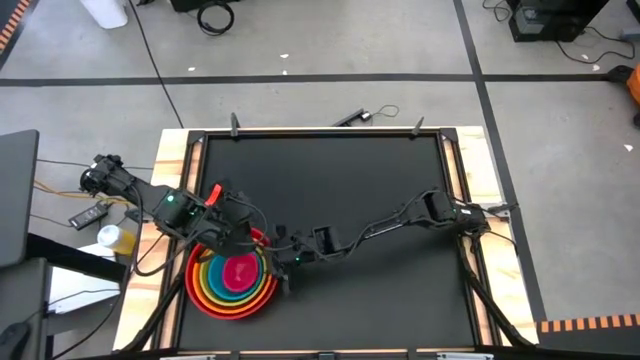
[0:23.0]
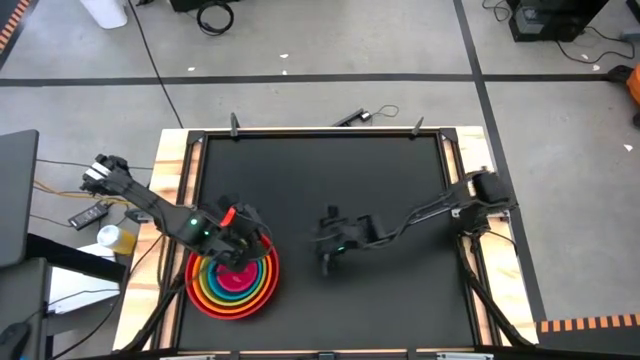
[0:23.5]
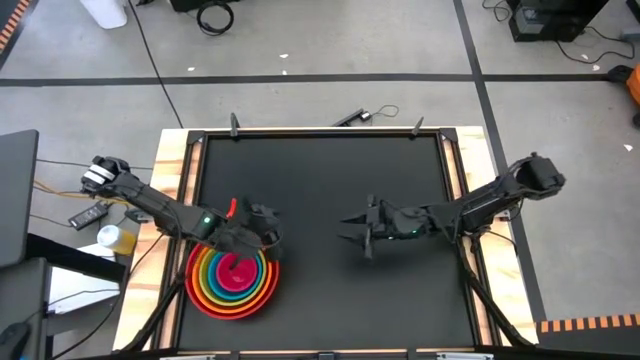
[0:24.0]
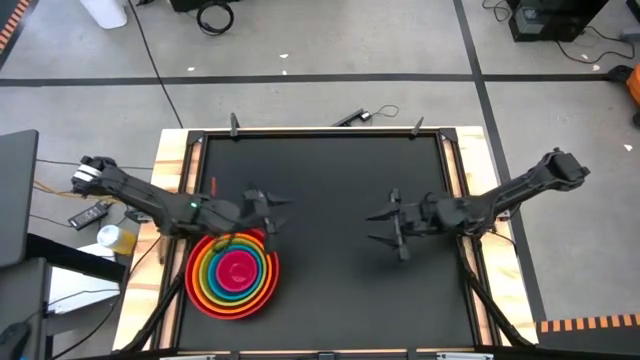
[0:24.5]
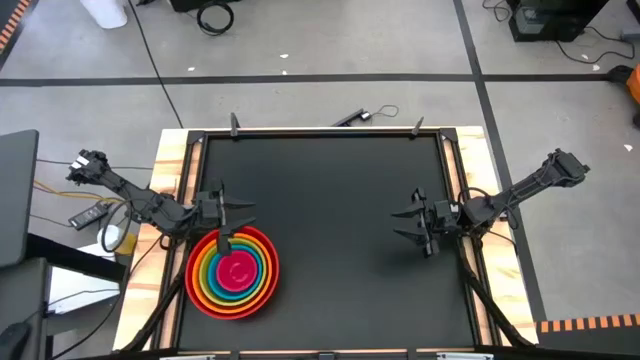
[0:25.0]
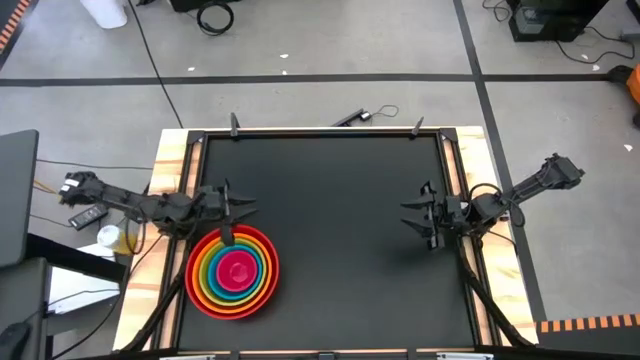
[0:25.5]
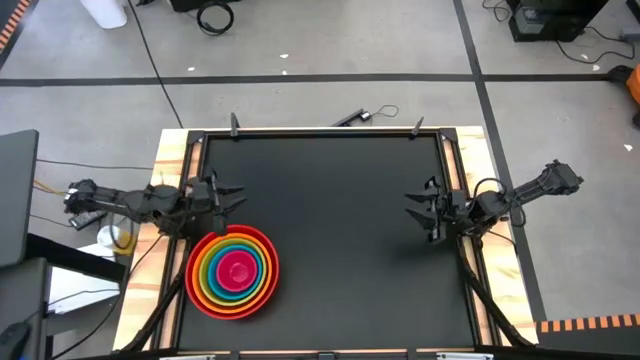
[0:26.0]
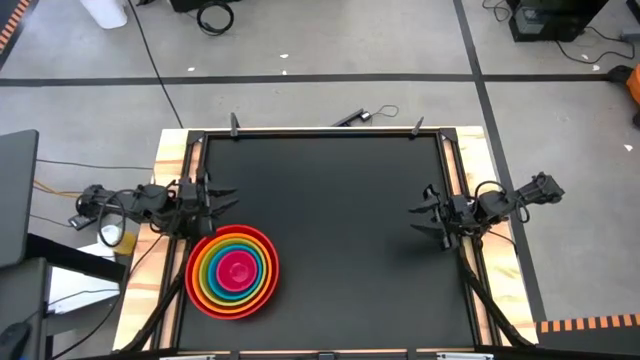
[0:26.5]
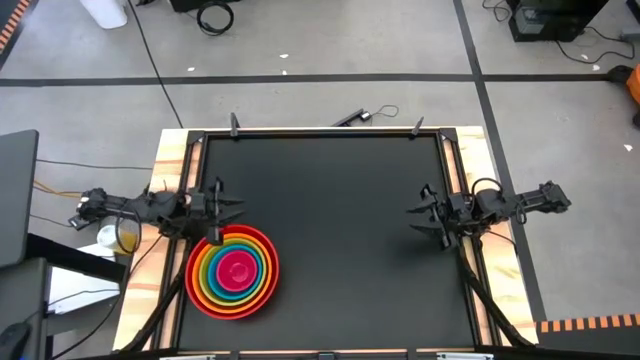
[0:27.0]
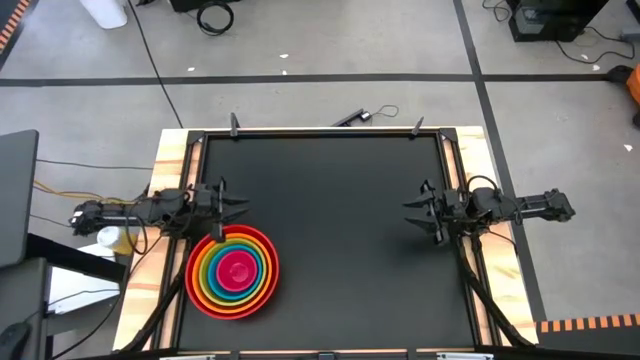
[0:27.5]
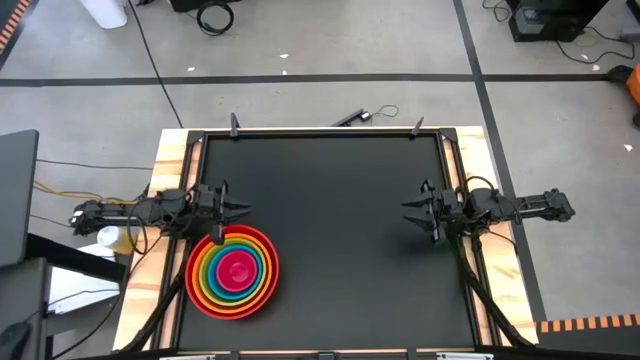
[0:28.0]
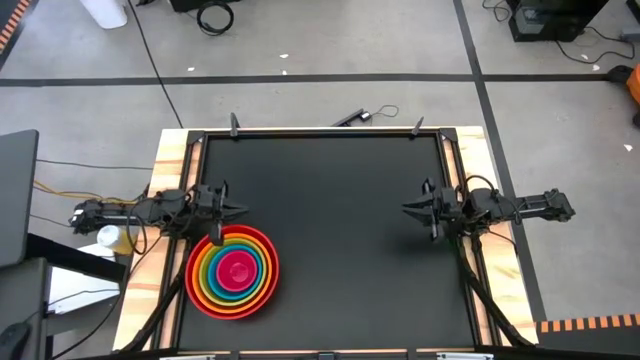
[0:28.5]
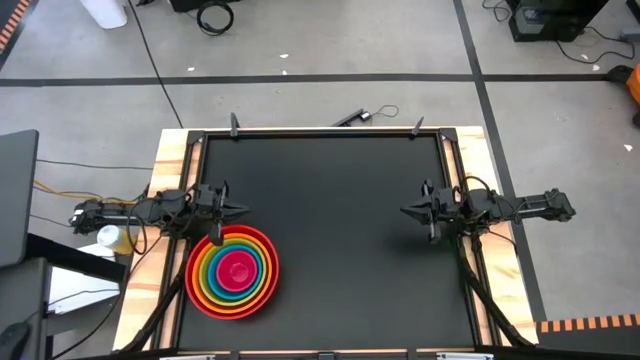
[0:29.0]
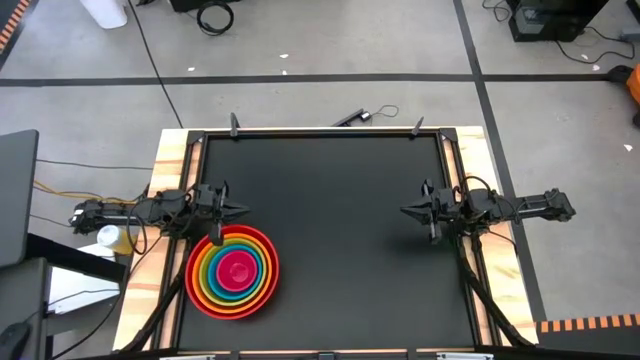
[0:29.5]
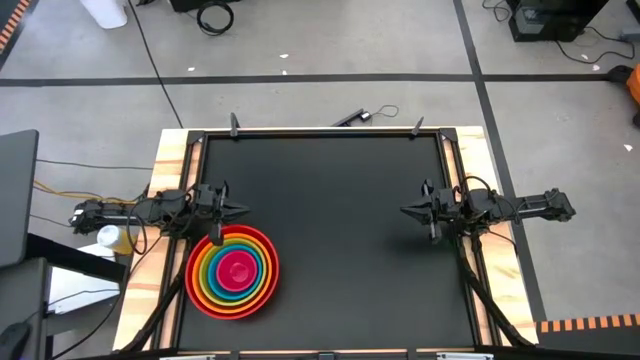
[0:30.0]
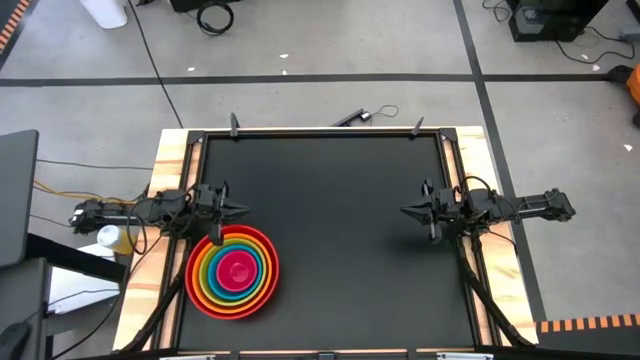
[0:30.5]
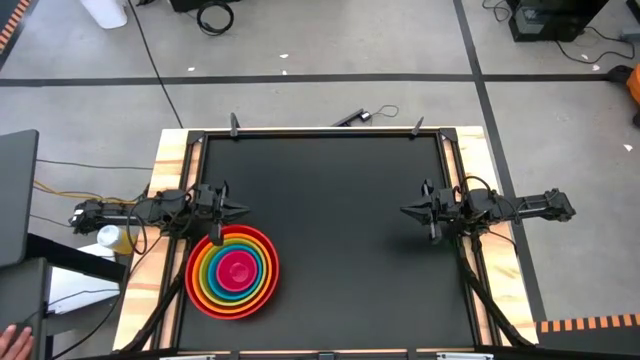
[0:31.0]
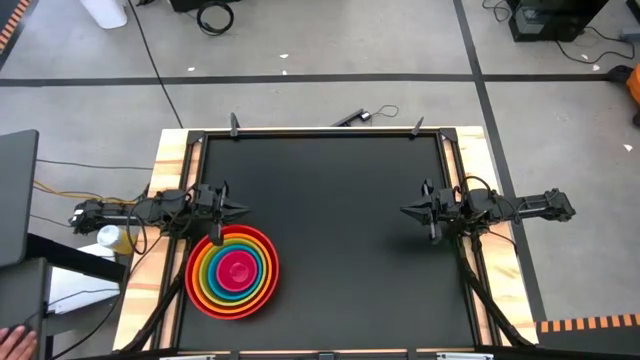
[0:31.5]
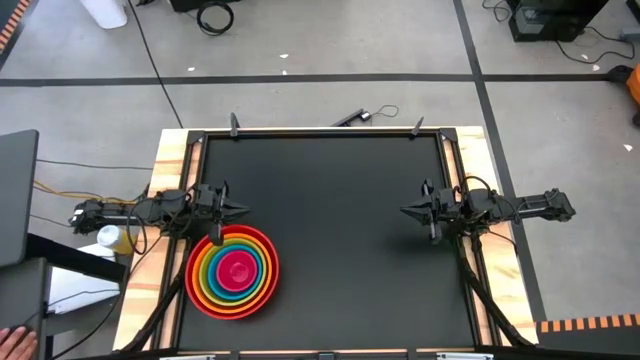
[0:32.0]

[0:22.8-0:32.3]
Return to Home Position

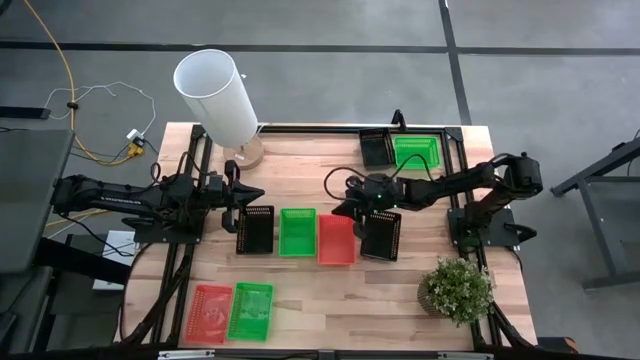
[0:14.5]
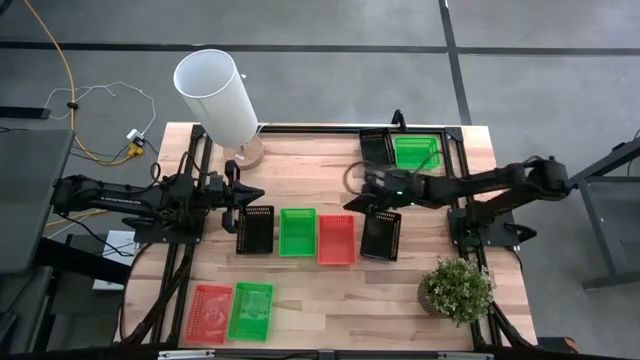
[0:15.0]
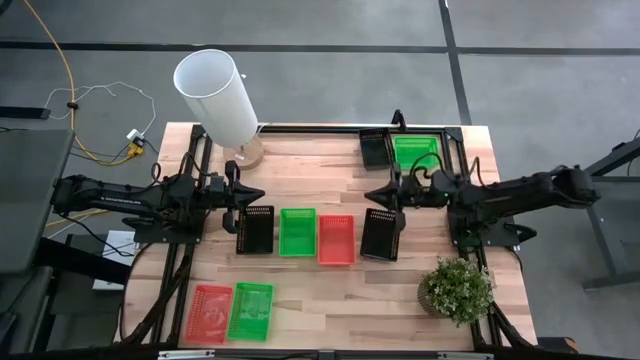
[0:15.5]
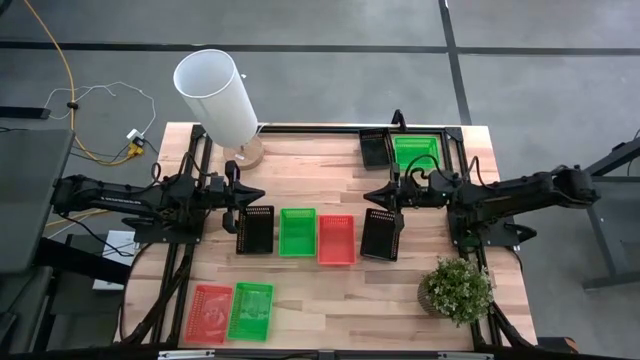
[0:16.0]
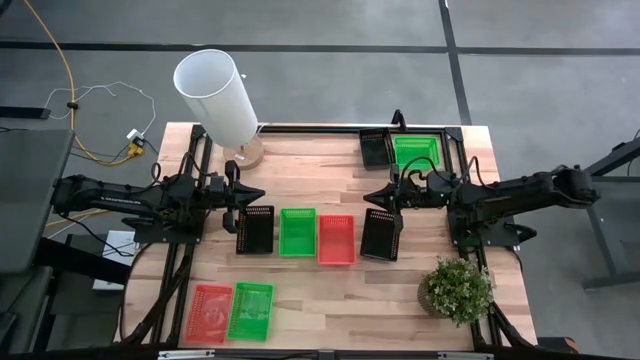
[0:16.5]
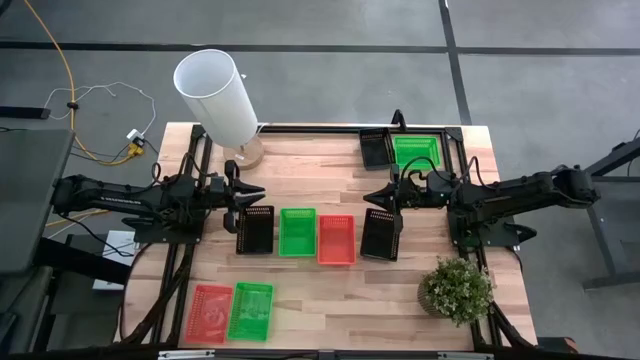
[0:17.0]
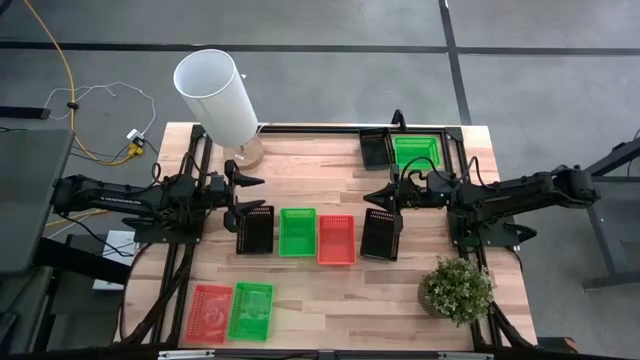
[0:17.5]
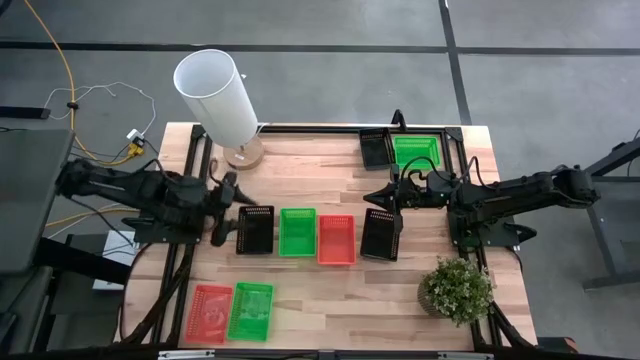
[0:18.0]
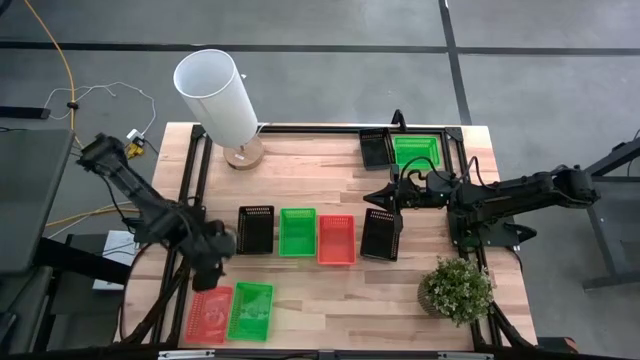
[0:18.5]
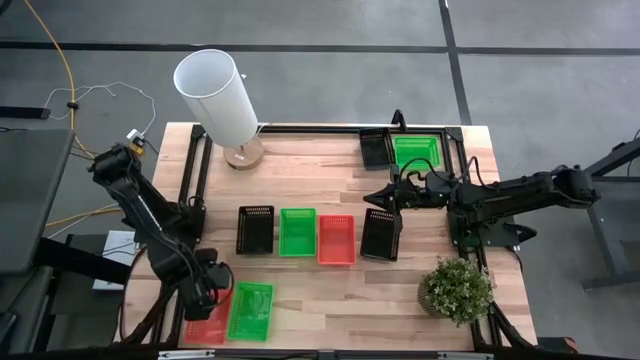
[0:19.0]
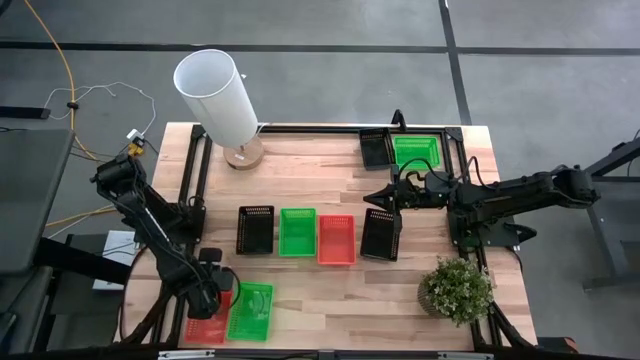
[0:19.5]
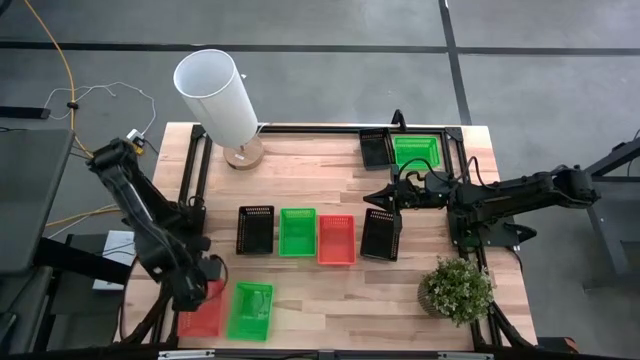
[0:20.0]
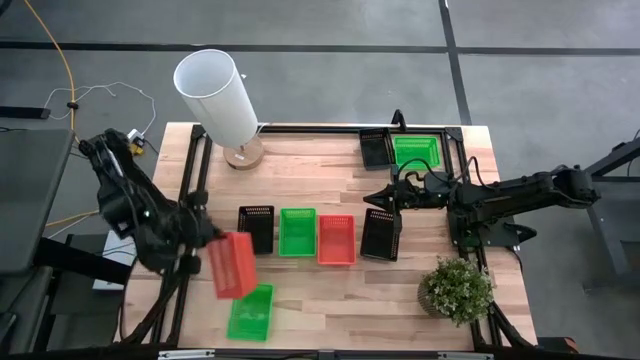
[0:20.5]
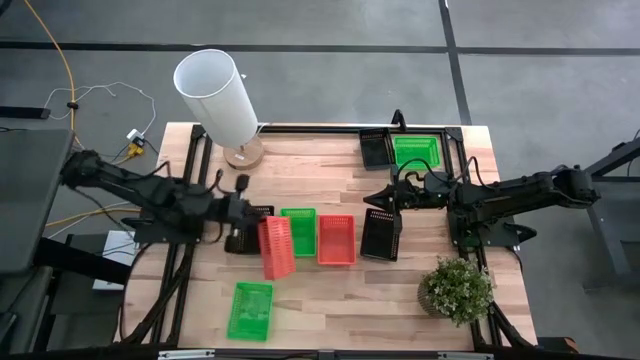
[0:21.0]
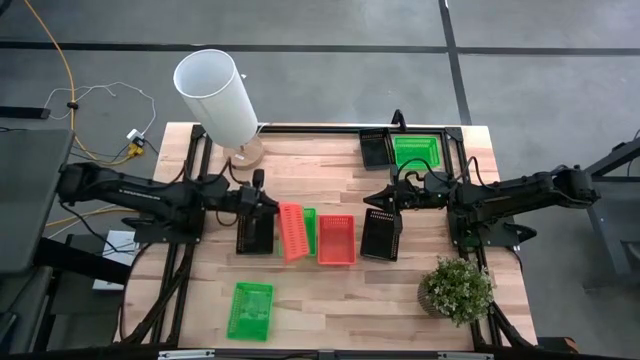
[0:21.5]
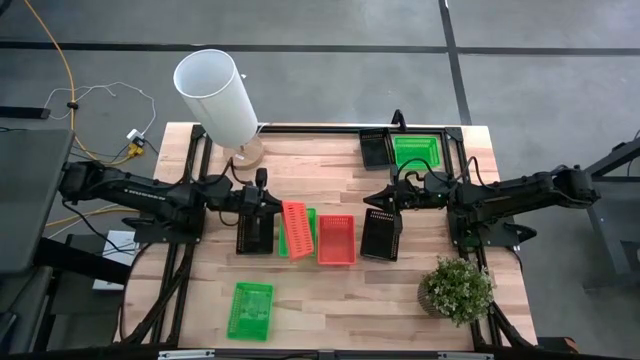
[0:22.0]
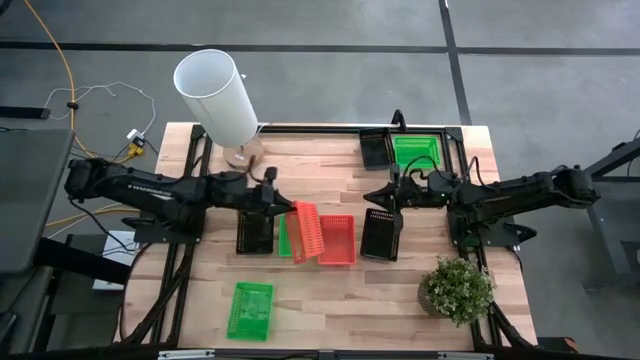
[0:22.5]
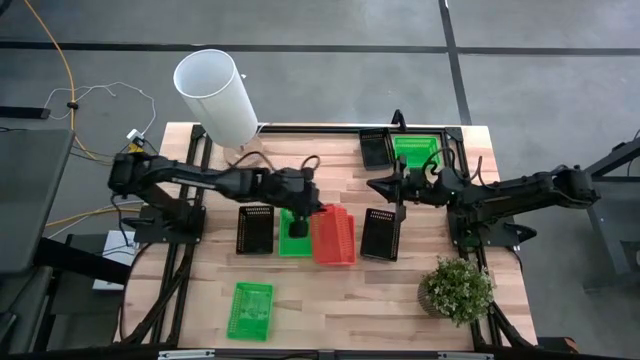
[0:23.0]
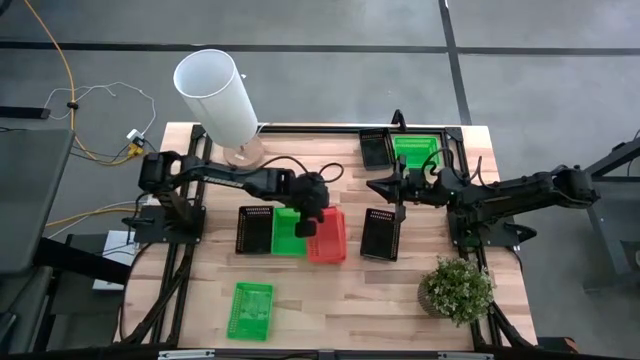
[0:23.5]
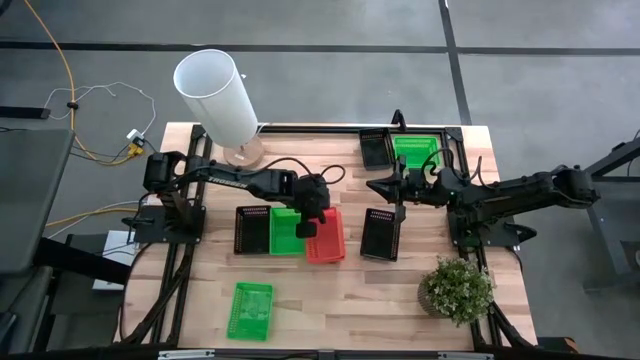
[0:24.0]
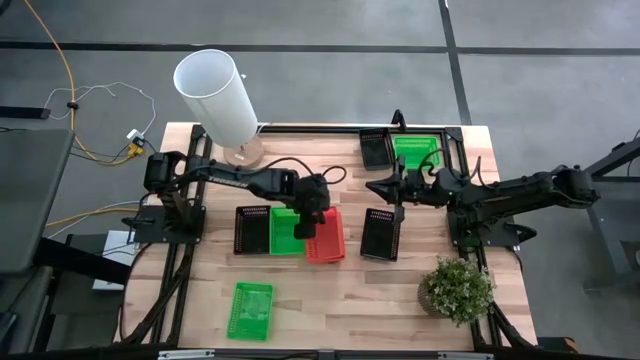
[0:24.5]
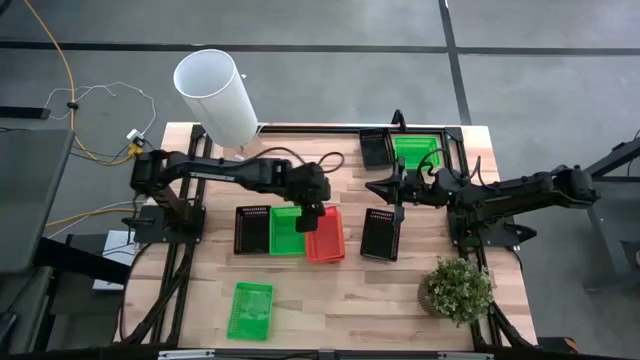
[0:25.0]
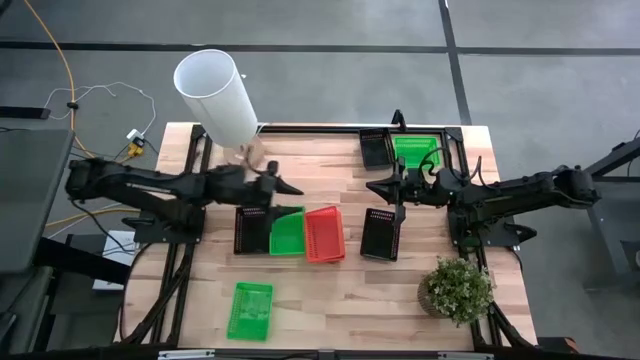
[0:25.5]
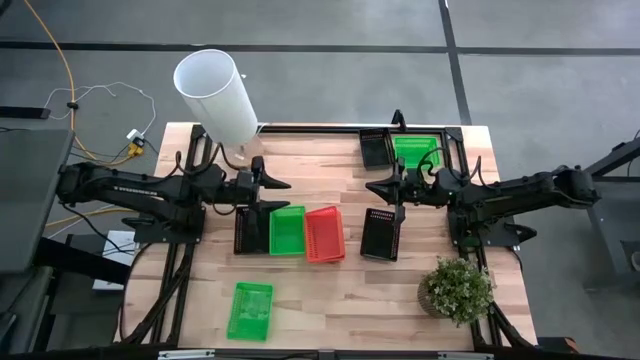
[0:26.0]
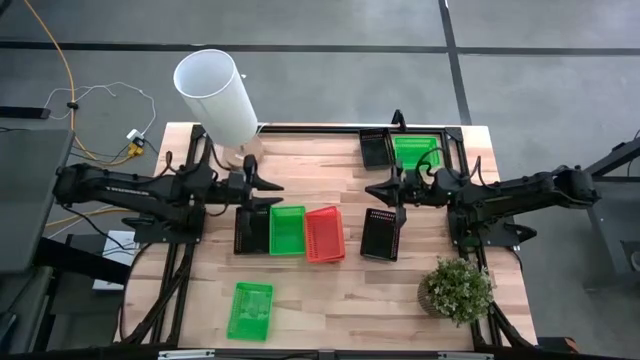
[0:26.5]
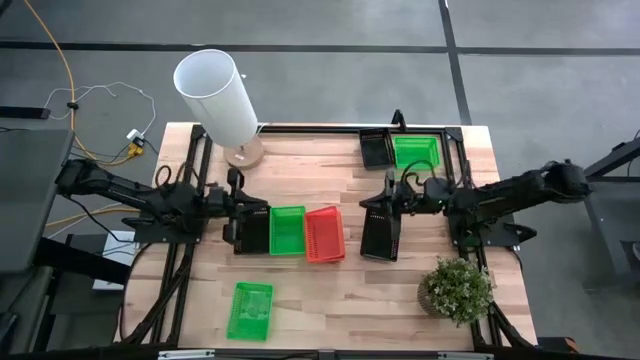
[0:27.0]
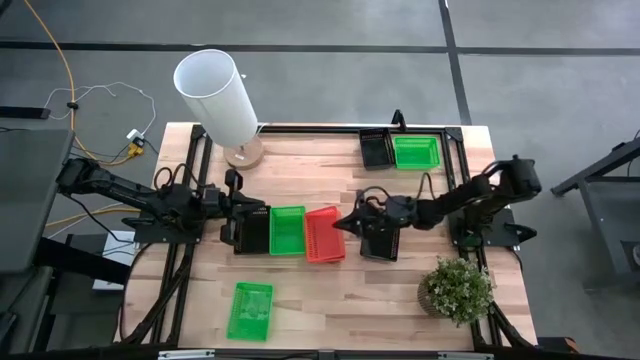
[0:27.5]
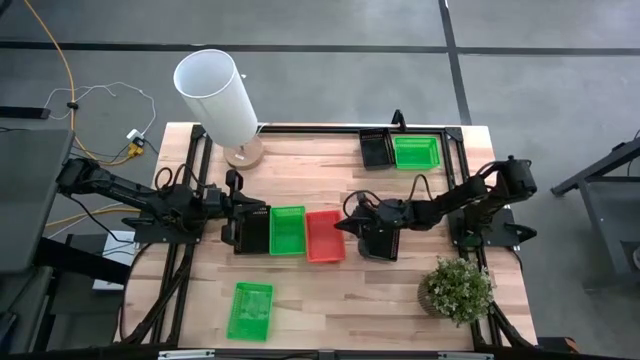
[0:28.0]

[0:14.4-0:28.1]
Stack the bottom orange bin on top of the top orange bins
